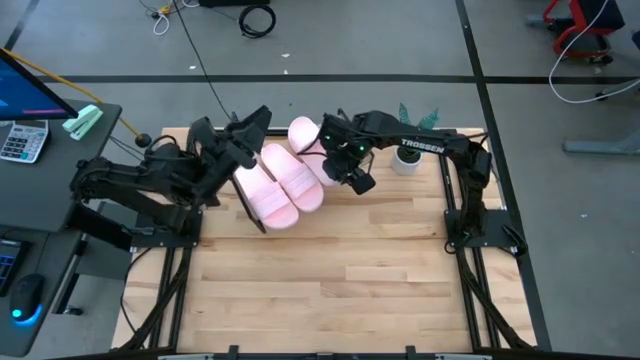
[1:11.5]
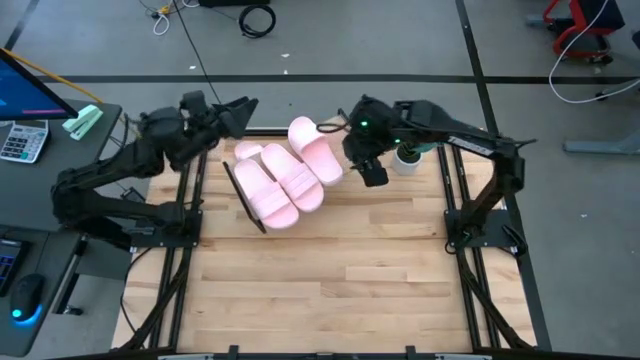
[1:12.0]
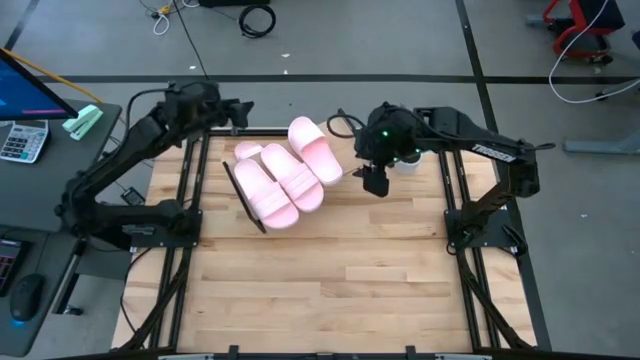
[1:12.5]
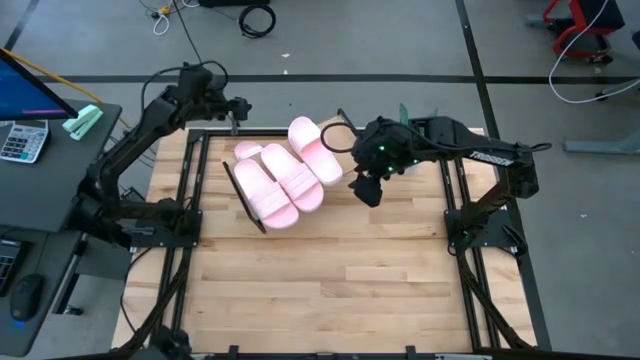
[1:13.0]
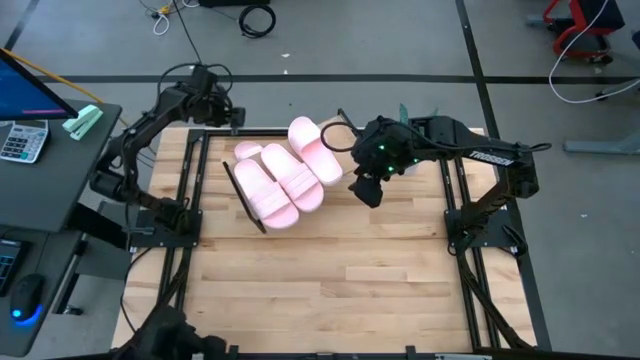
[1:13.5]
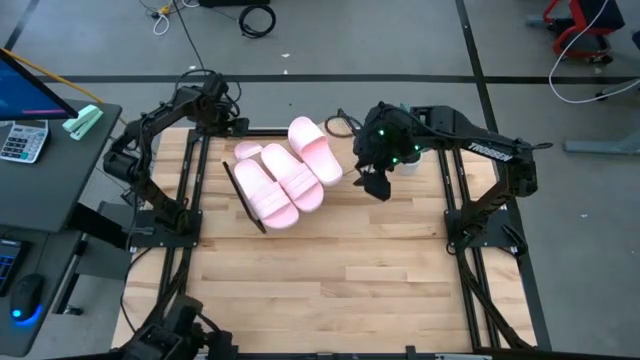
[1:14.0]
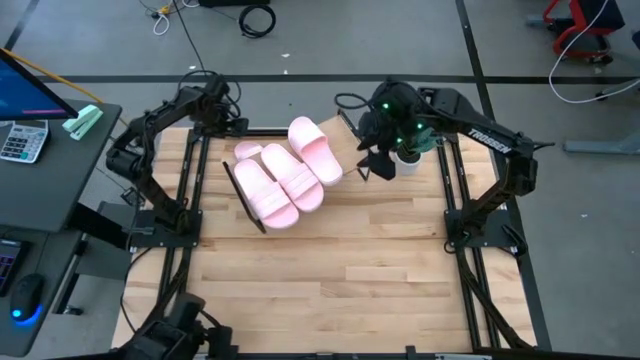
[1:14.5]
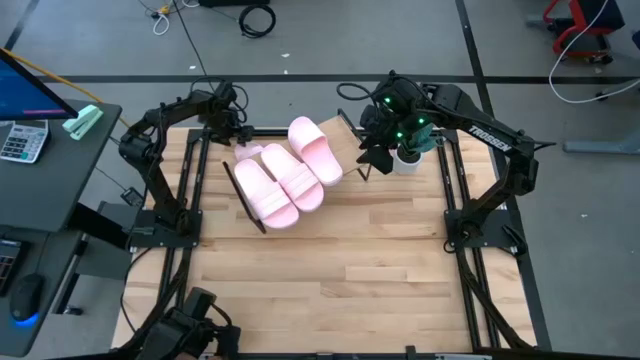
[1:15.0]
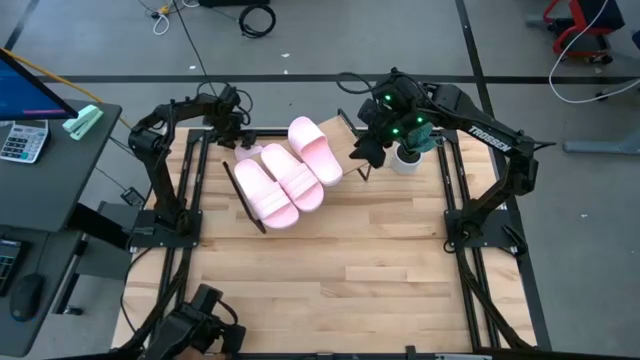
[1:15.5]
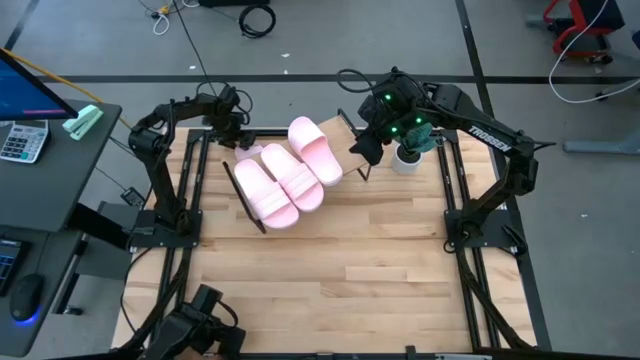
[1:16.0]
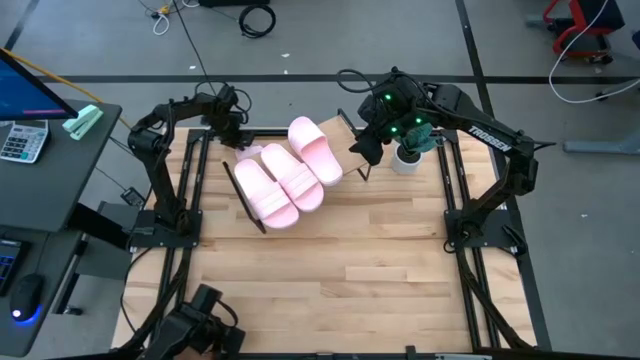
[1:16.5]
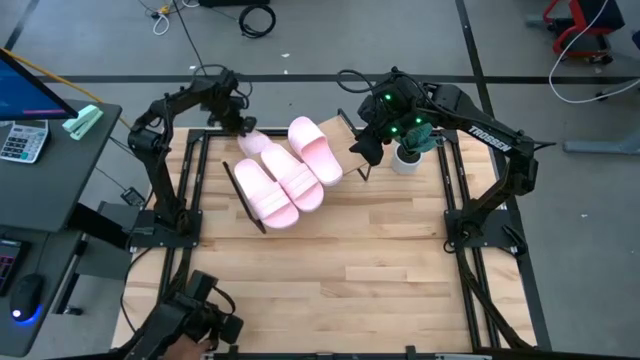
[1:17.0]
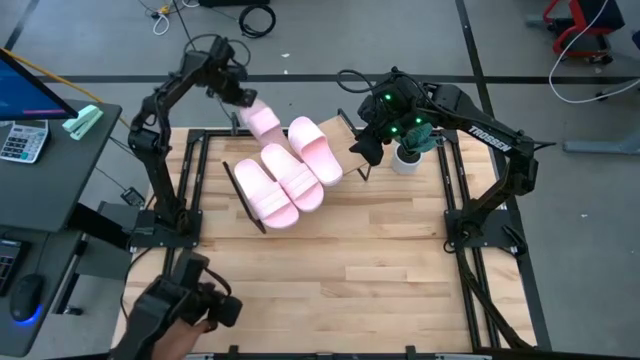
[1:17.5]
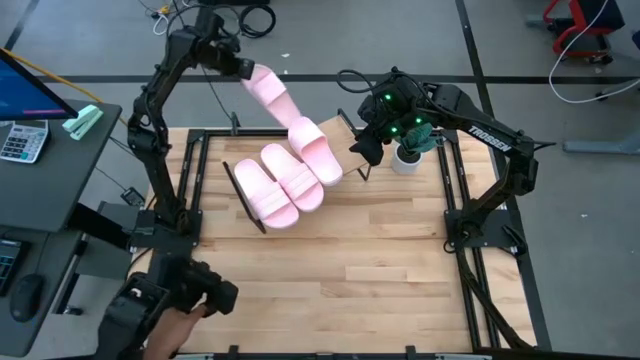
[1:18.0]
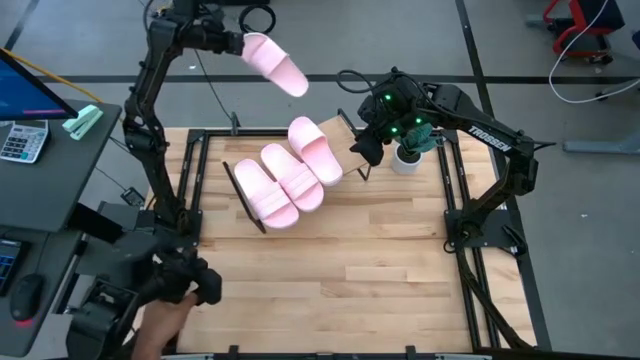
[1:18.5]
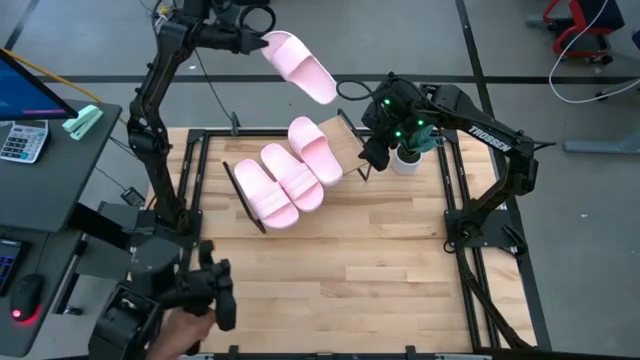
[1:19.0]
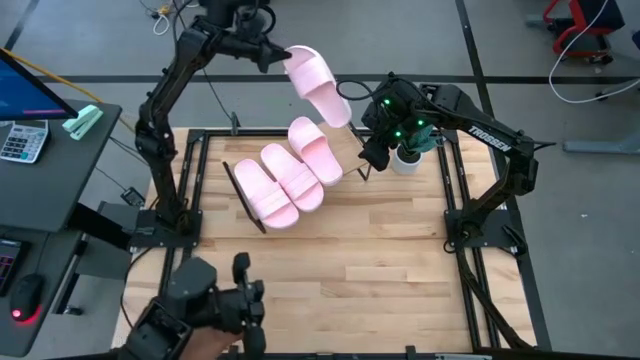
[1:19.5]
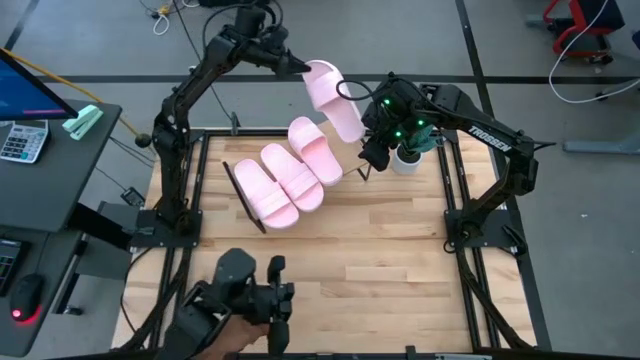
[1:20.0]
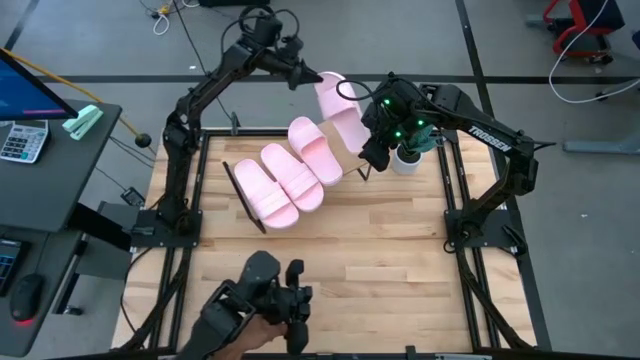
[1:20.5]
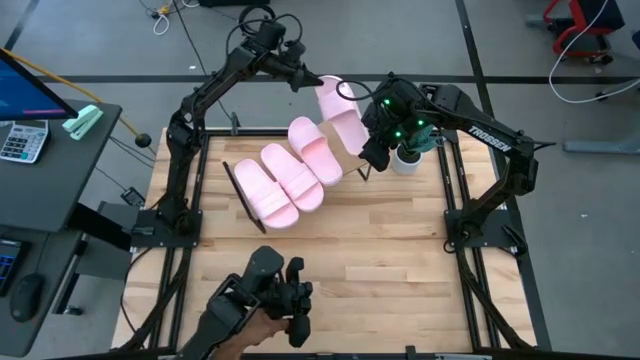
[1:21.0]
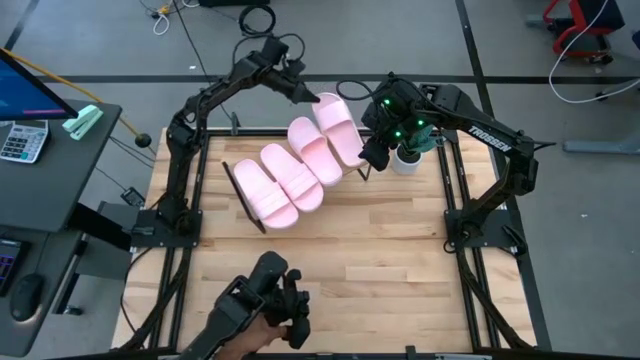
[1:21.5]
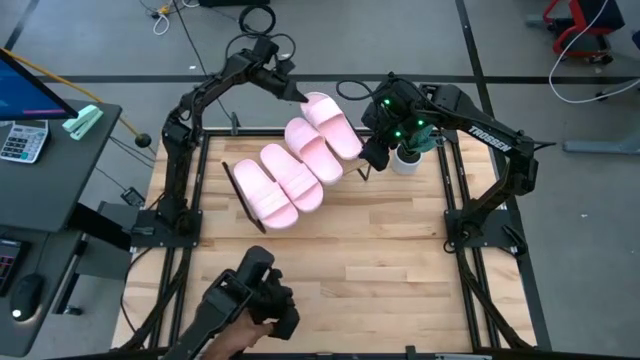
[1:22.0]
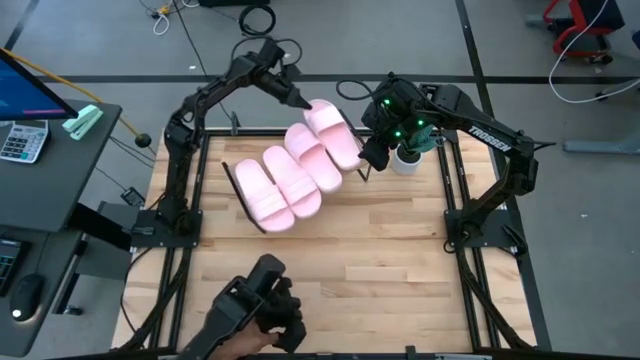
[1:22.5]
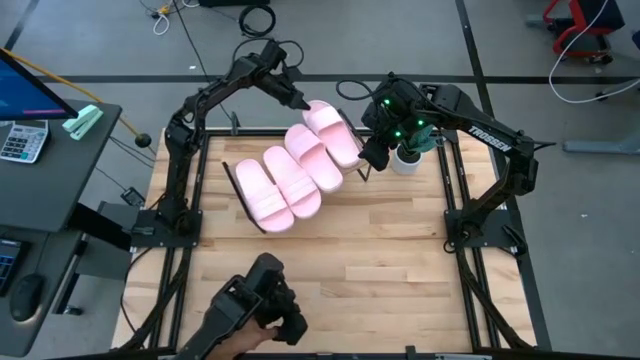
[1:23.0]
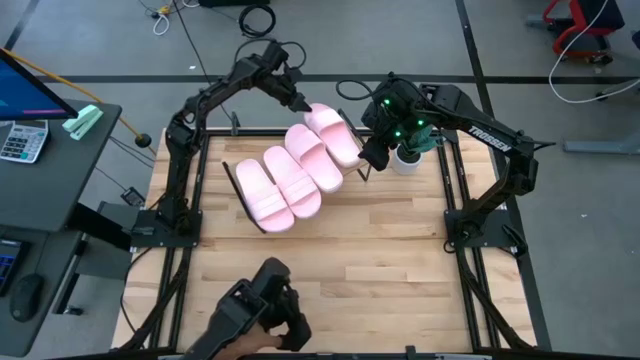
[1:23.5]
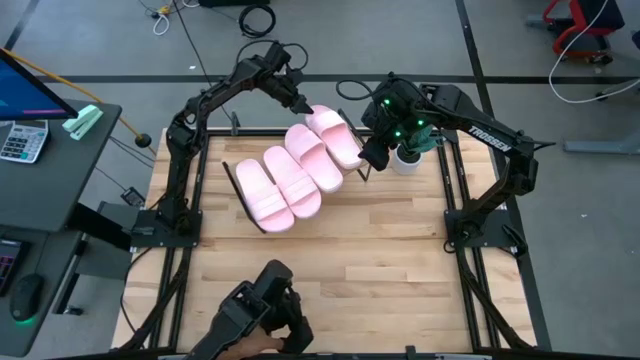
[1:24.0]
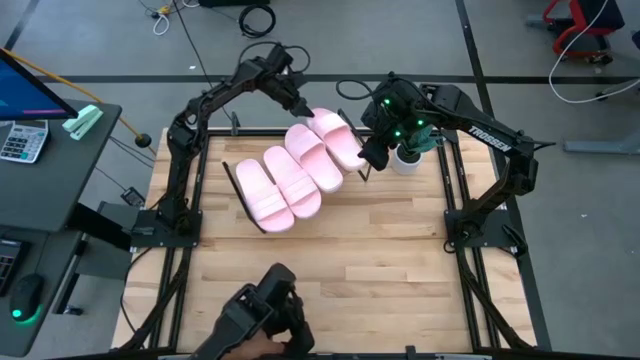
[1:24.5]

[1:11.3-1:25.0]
Task: Pick and place slides into the shelf
Put the pink slipper on the shelf

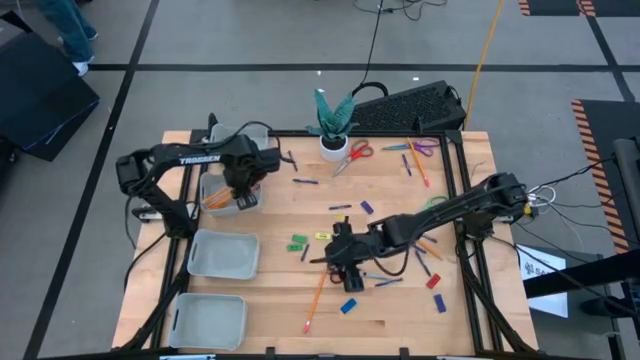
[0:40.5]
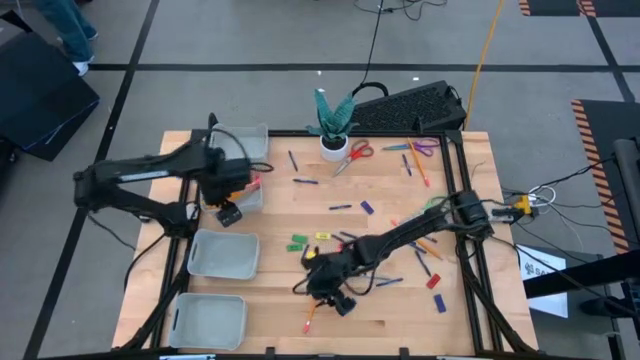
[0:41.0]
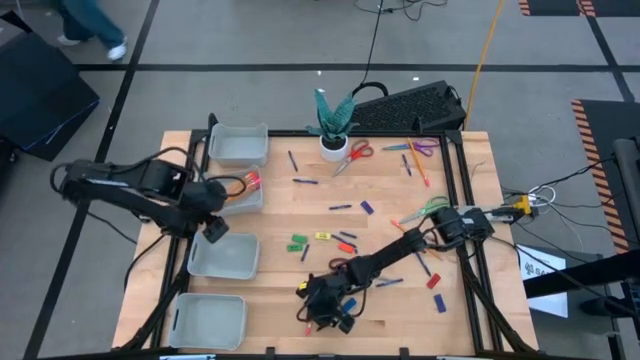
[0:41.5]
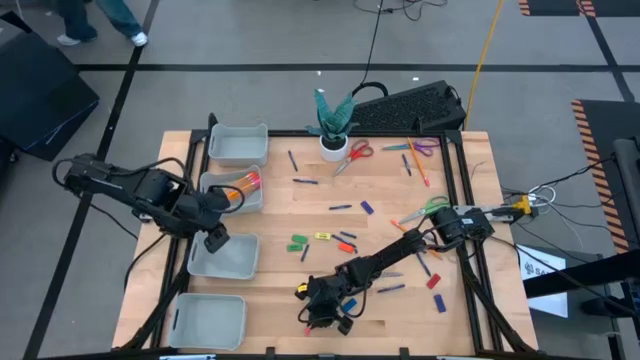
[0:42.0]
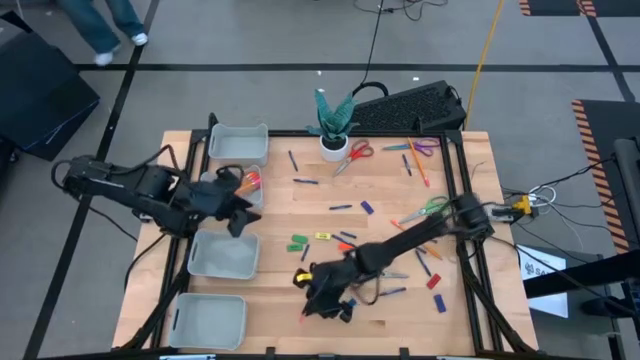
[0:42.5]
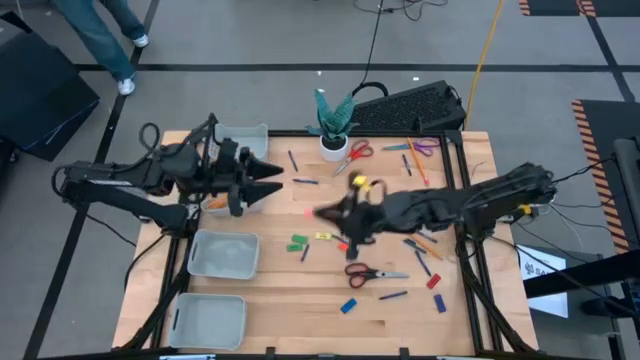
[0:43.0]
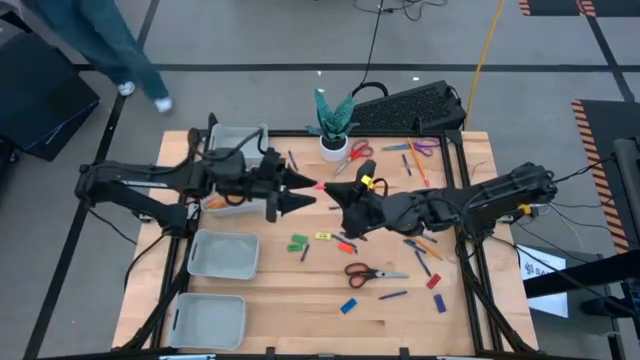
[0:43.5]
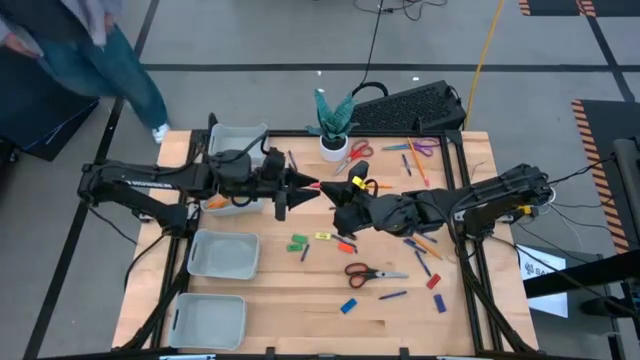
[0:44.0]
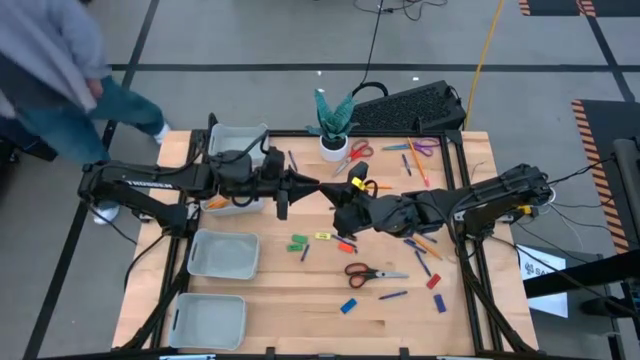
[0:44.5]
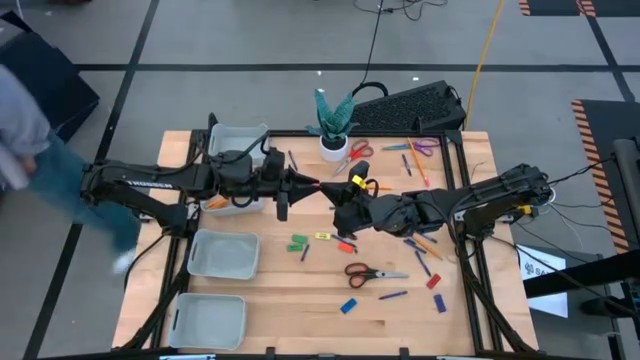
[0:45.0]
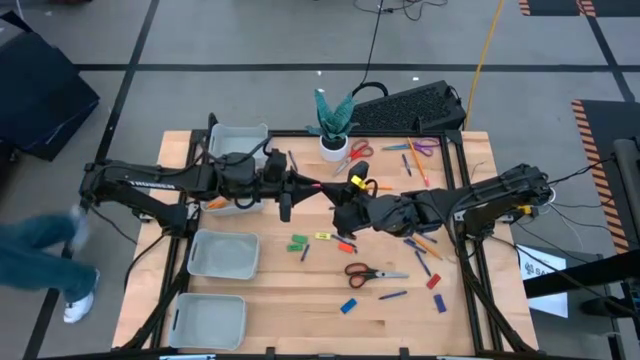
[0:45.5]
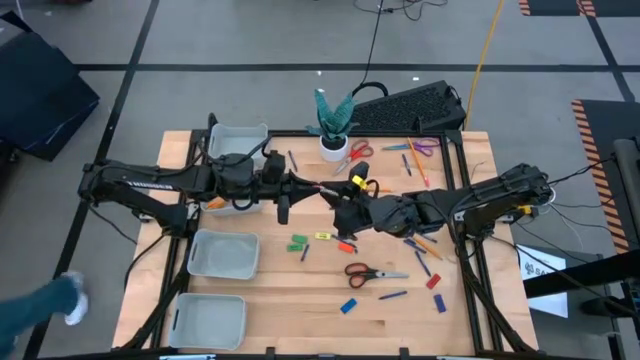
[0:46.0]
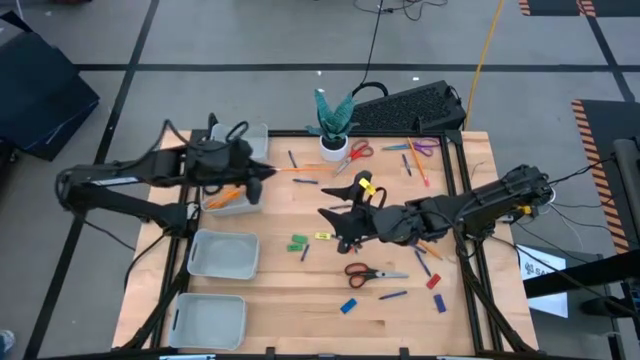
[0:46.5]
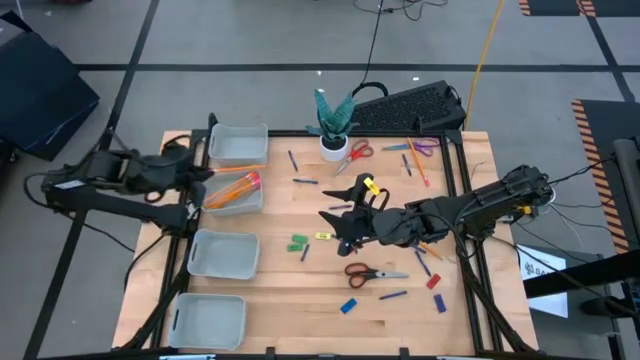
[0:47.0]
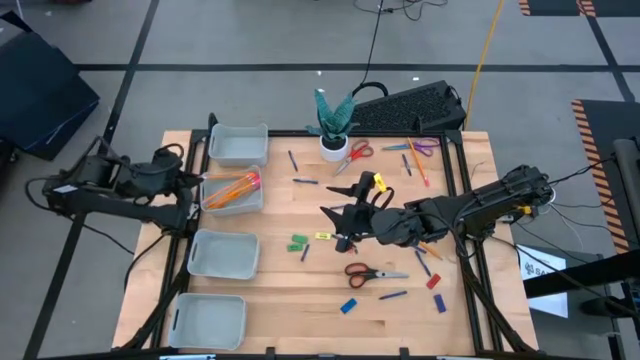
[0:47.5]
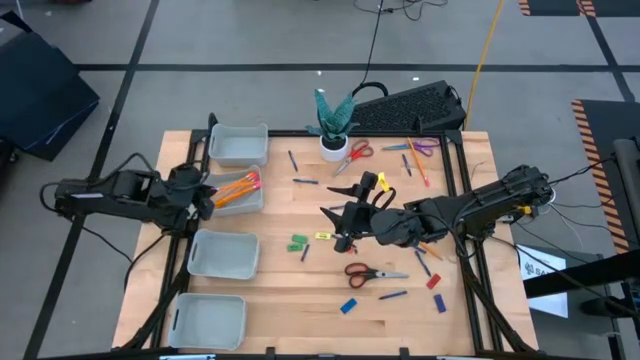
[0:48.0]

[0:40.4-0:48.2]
Task: Sort crayons/erasers/pens/pencils in bins
Put the orange pencil into the middle top gray bin

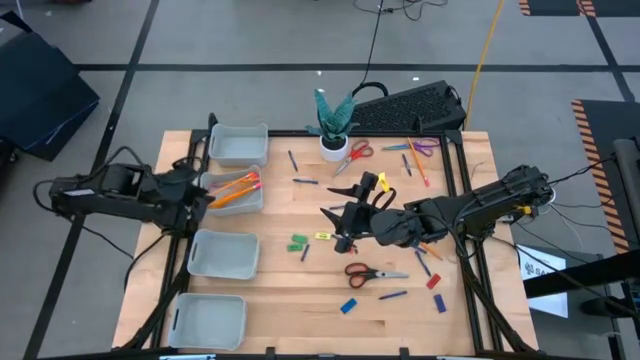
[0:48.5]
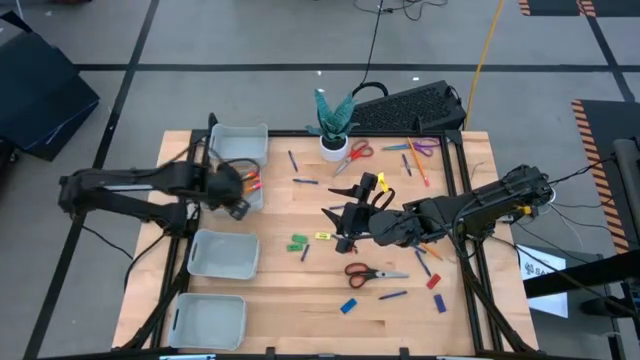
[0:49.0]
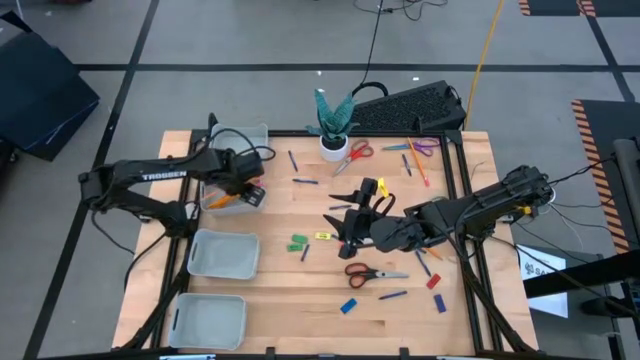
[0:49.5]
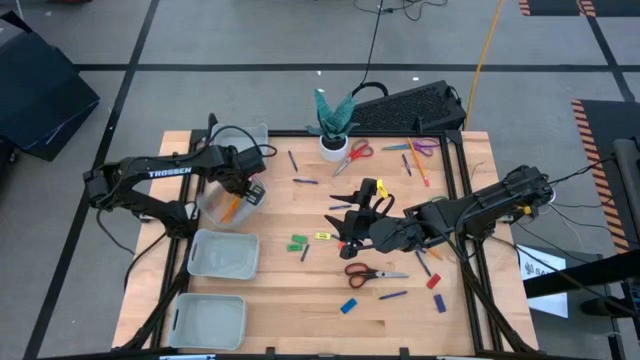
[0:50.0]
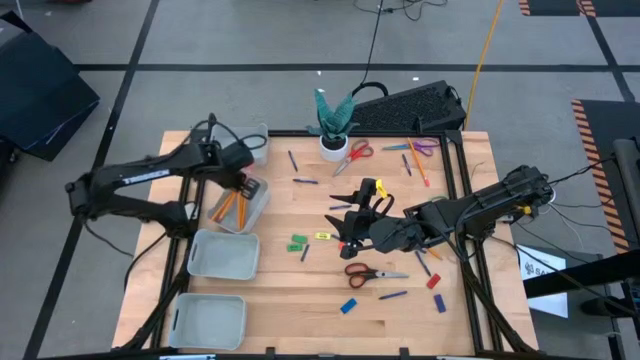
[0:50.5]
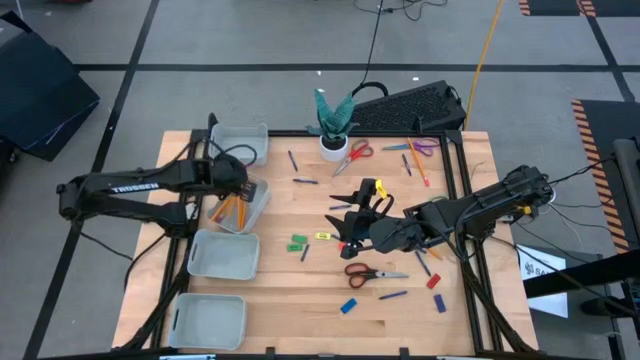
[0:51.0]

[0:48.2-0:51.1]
Put the orange pencil into the middle top gray bin
